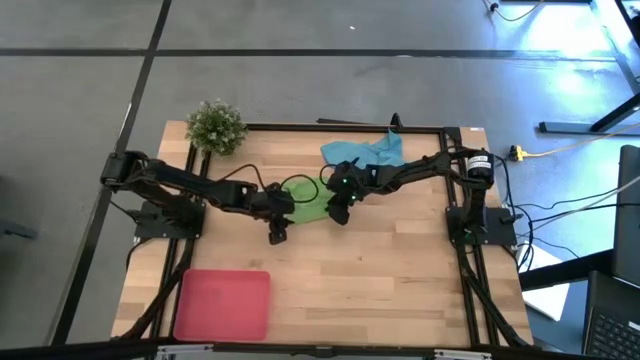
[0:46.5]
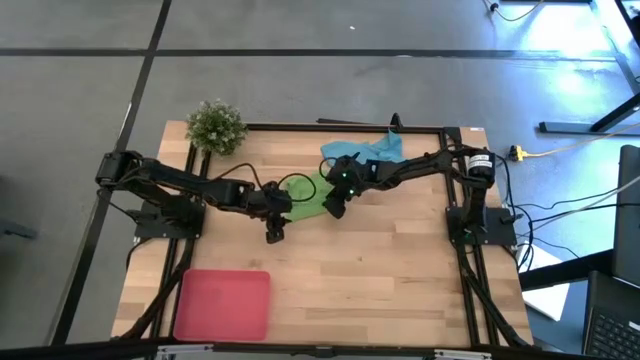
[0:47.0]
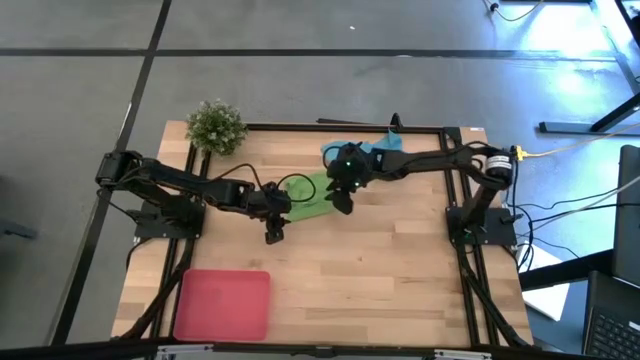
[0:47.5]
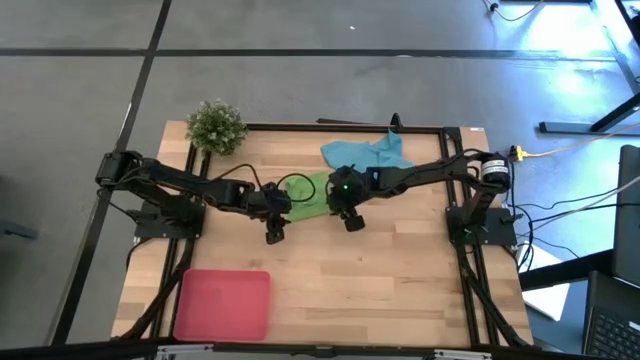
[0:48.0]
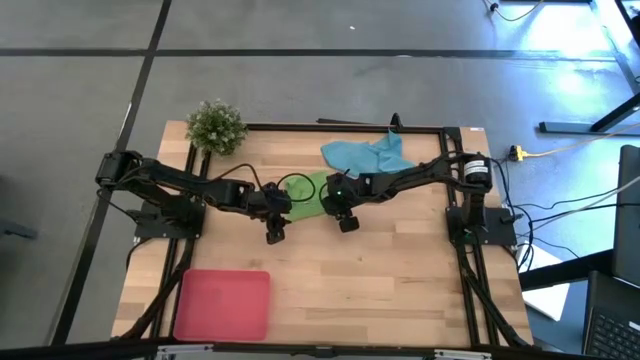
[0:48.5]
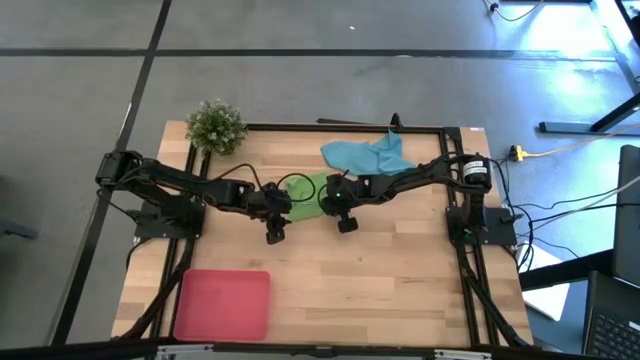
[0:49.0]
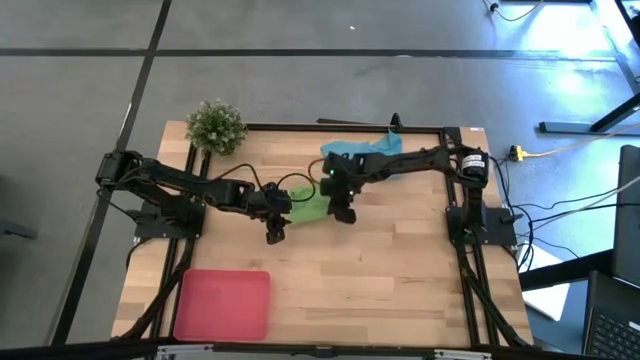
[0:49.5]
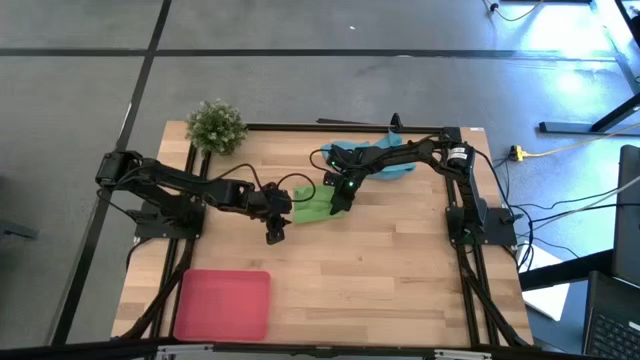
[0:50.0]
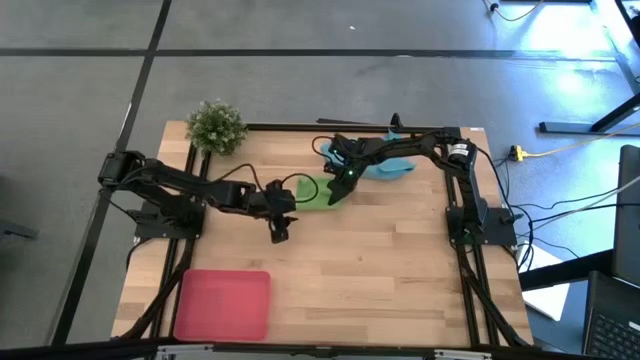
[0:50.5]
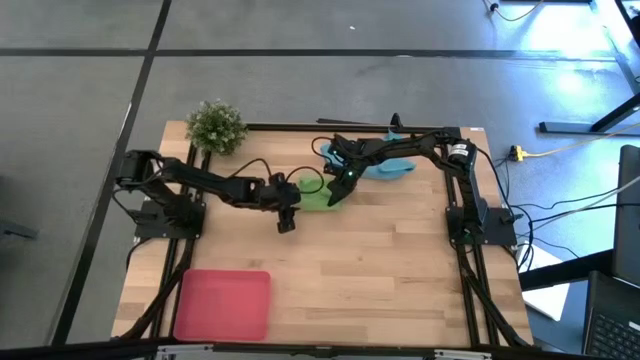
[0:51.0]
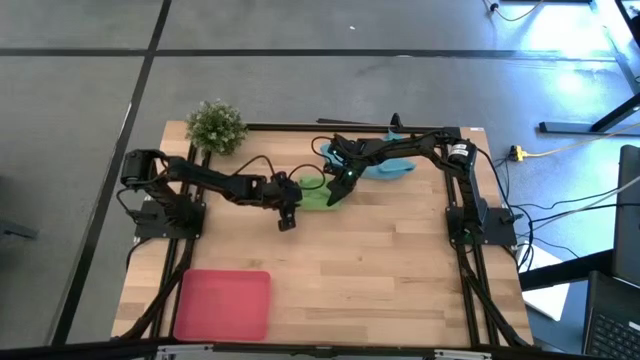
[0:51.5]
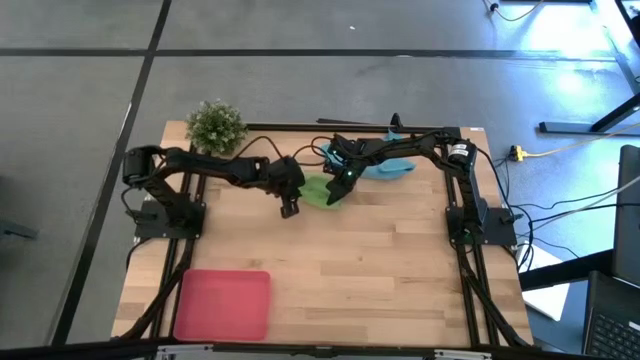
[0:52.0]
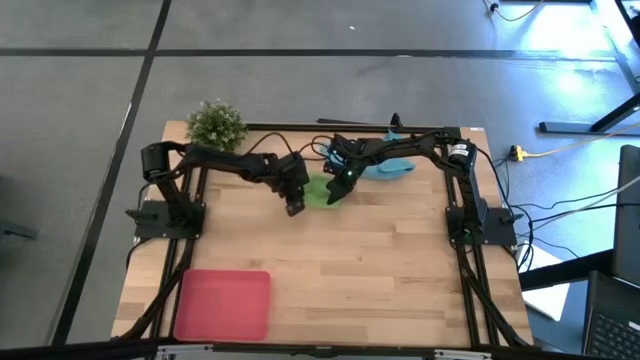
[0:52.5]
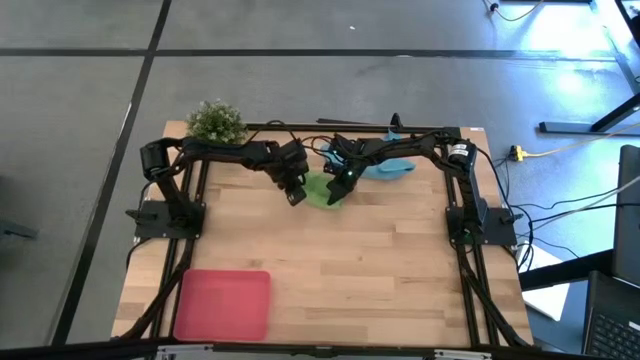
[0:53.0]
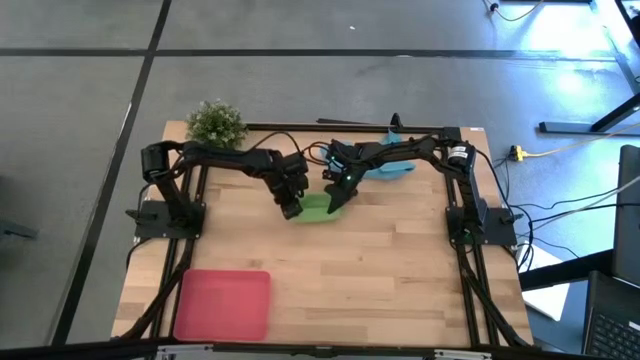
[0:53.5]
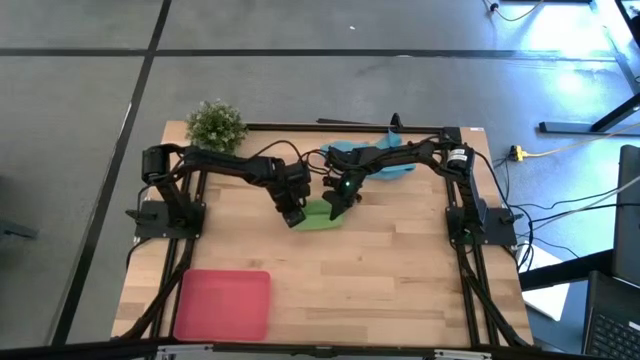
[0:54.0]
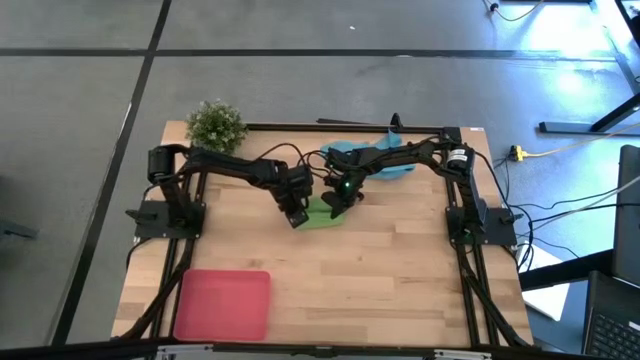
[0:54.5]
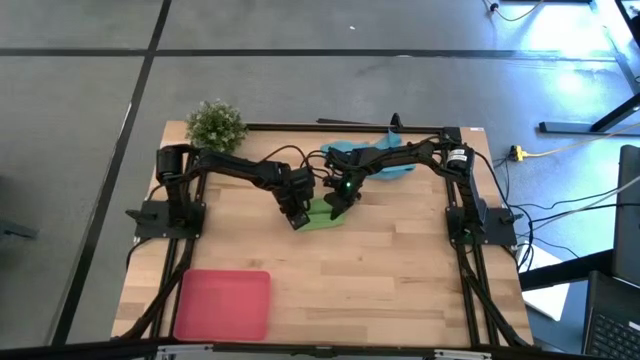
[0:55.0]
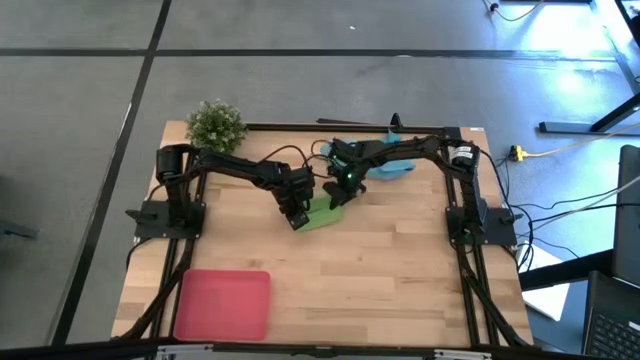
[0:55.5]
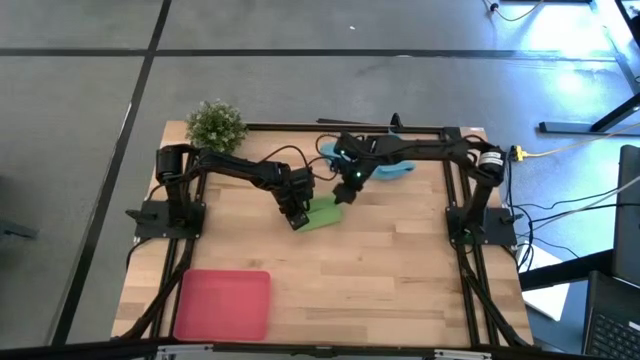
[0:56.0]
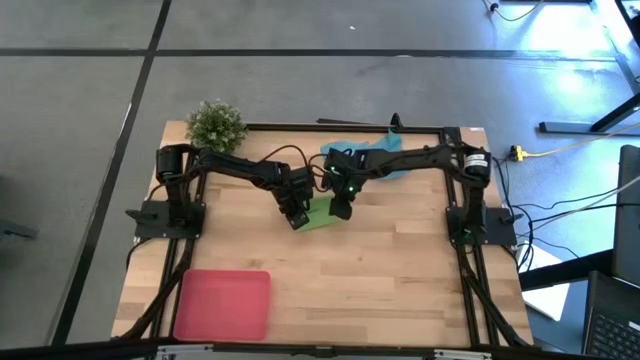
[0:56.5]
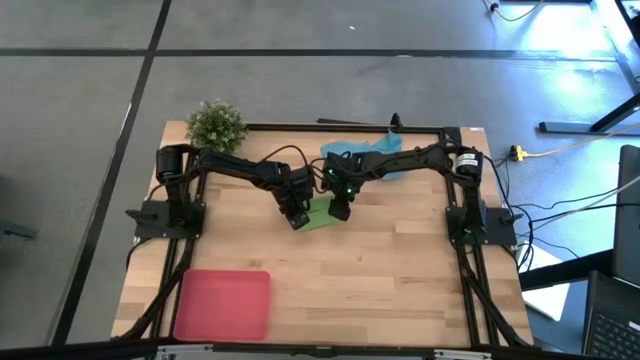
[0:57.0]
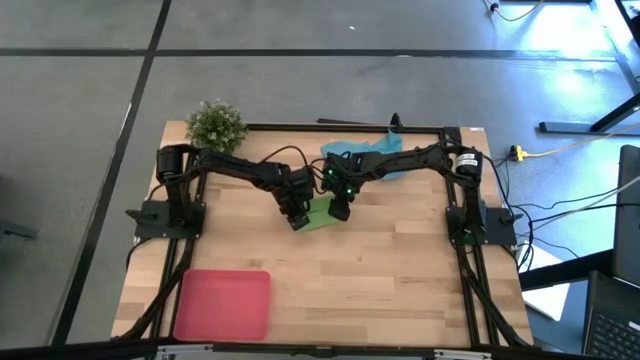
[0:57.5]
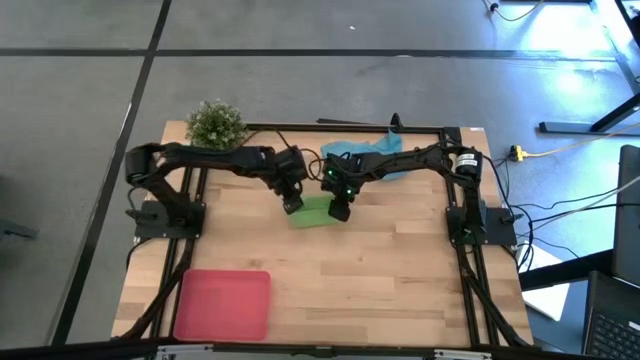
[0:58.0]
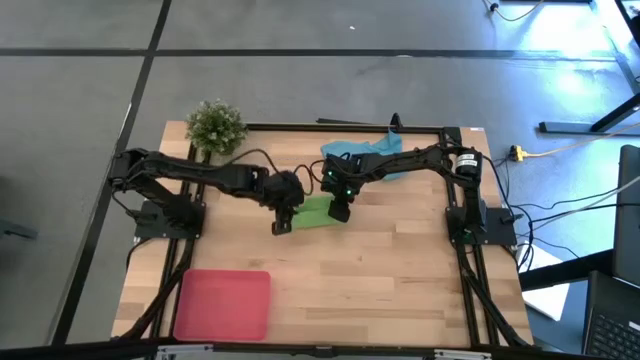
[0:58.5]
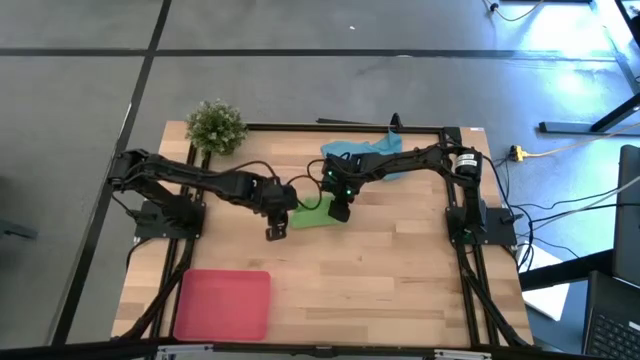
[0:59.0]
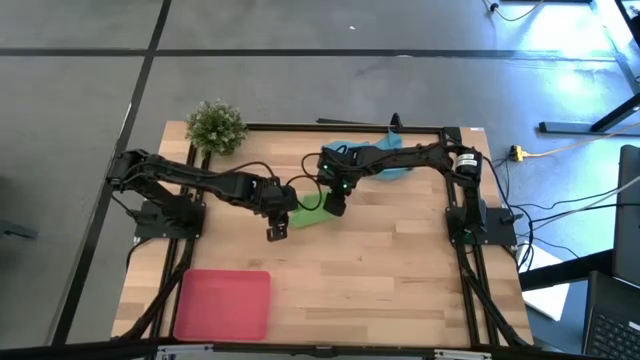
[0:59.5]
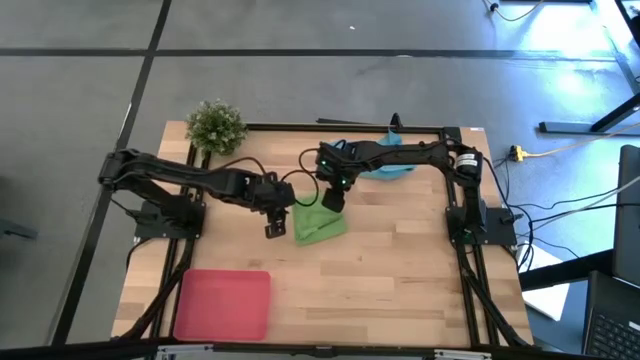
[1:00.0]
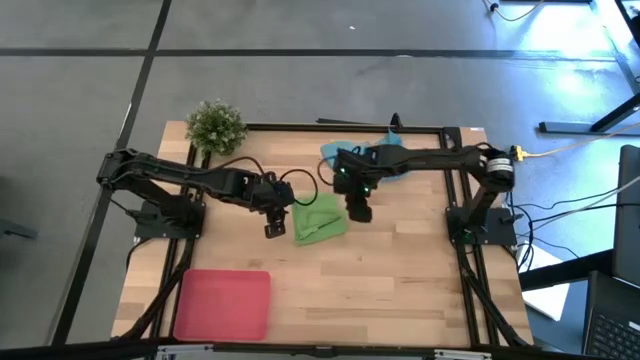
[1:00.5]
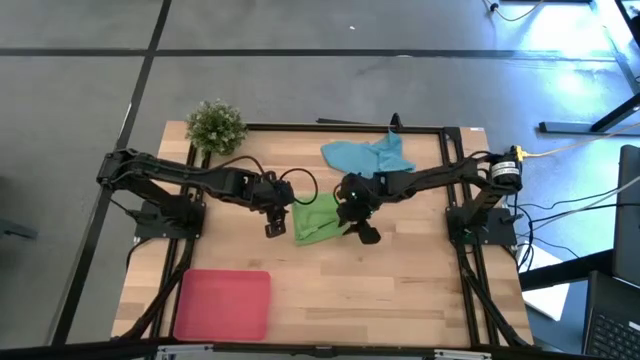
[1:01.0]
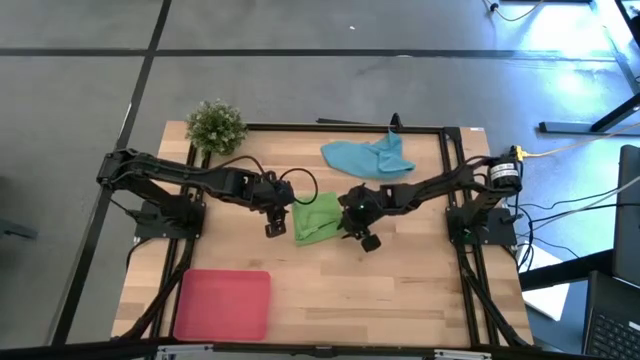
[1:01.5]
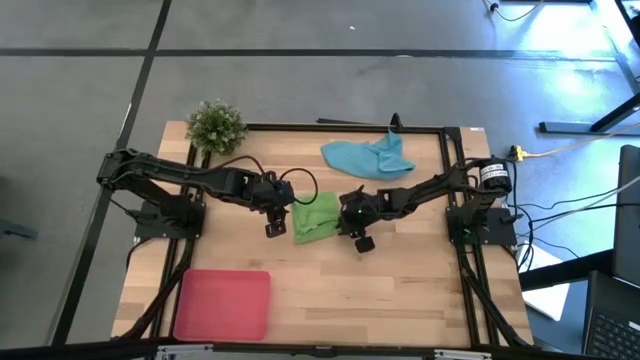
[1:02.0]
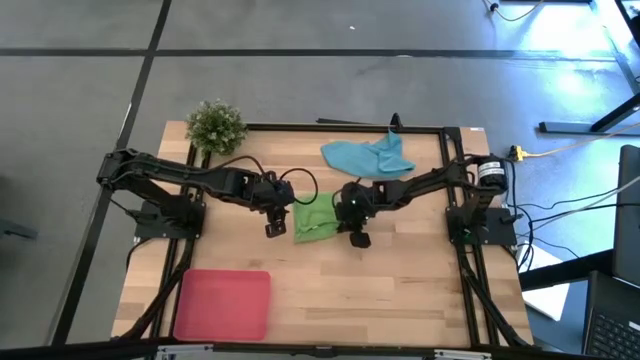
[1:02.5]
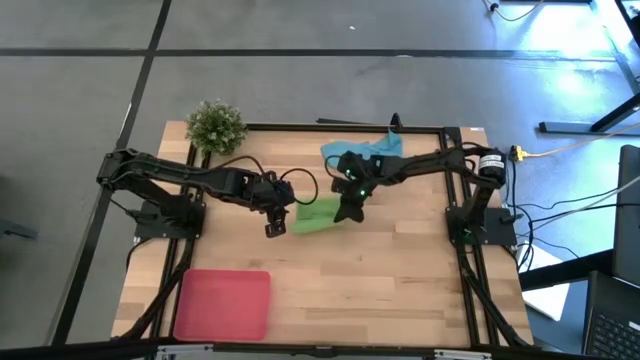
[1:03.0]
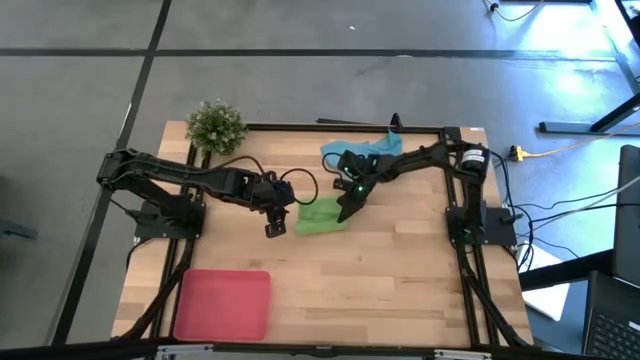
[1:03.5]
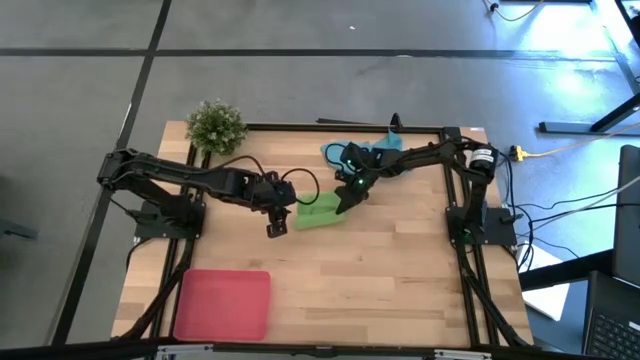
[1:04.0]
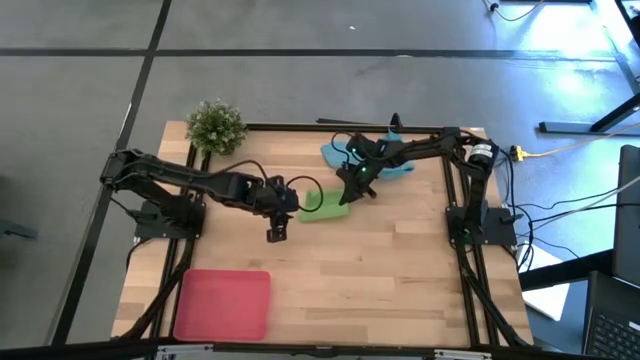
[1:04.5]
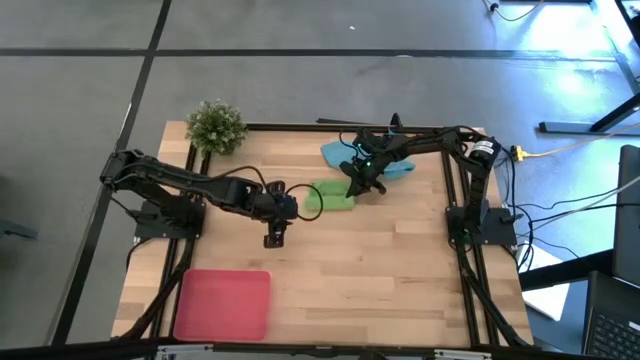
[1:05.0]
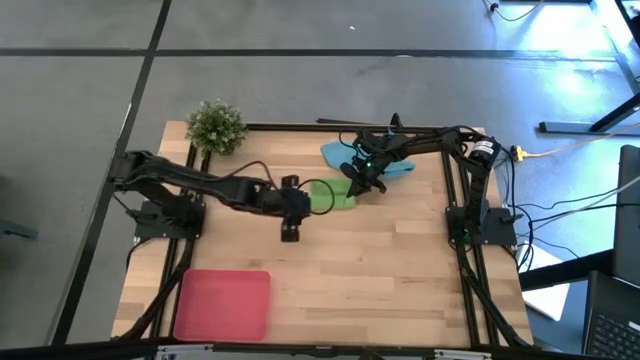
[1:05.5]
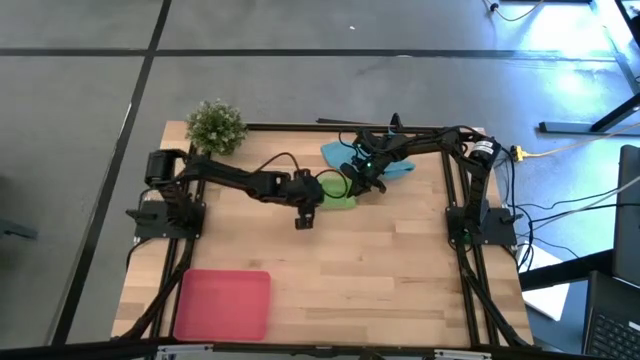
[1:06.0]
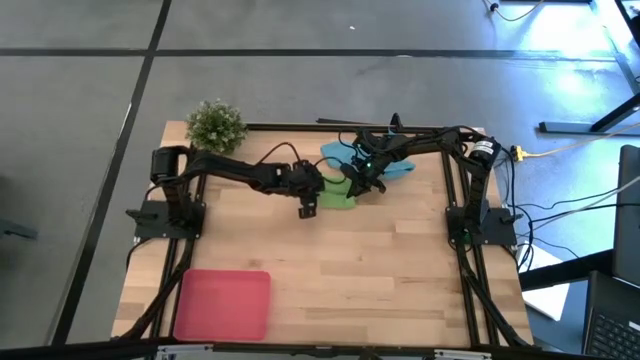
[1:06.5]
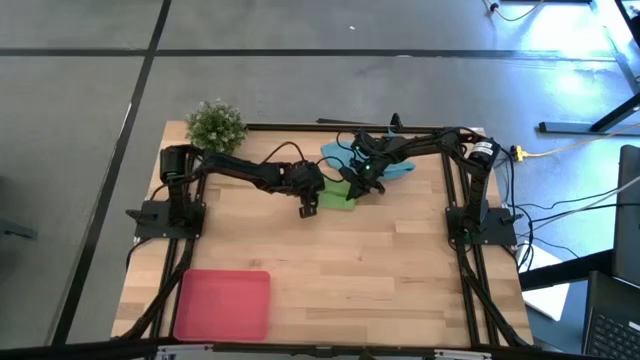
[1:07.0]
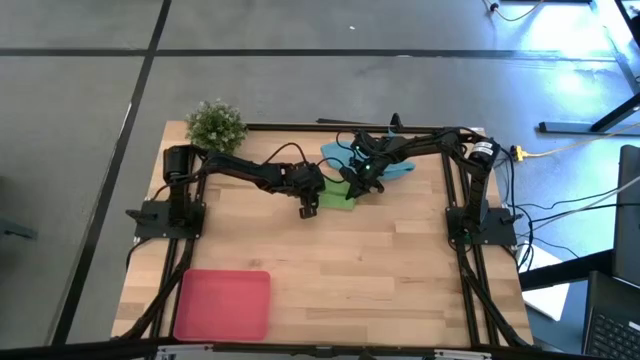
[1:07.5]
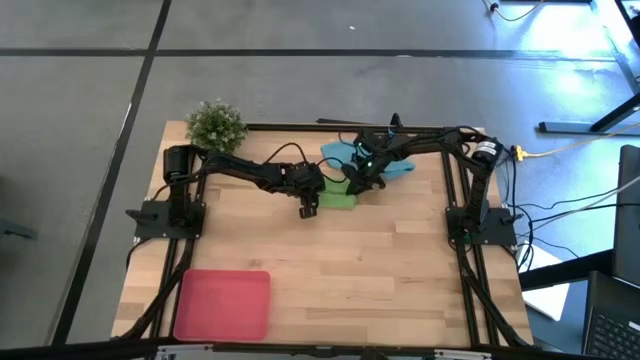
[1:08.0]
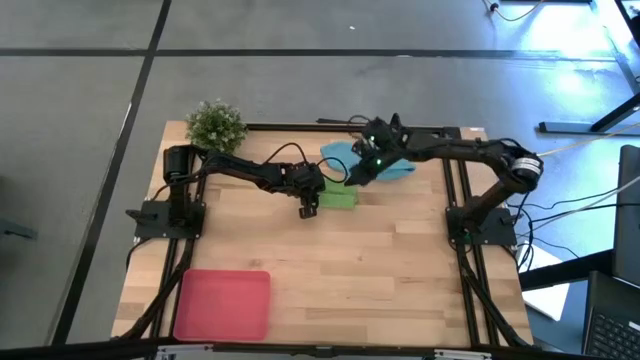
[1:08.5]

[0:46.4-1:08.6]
Task: Roll microfiber towels into tight, uniform cylinder then place into a basket
Roll the microfiber green towel
